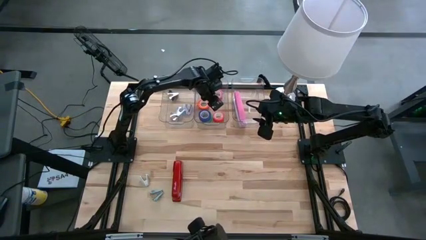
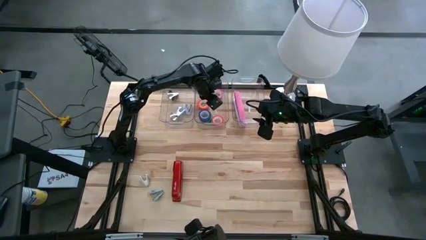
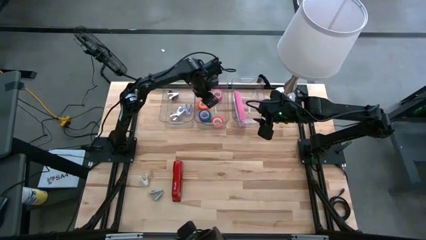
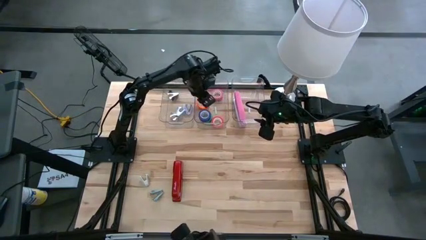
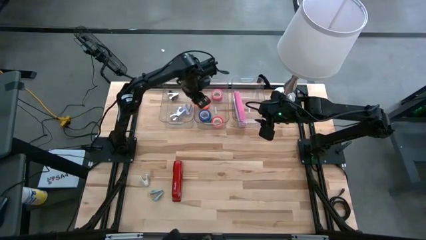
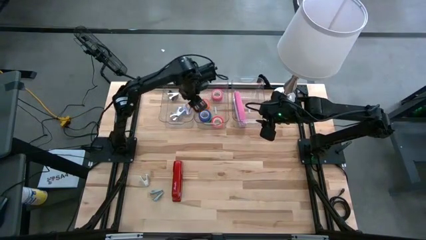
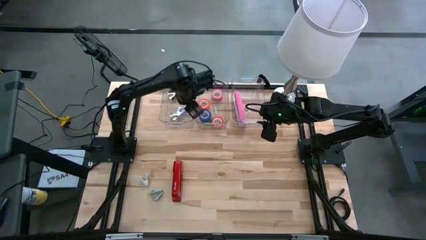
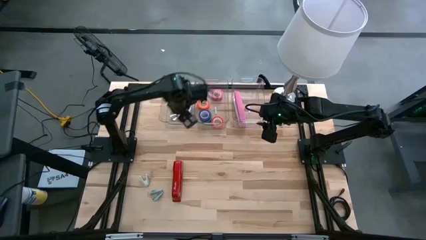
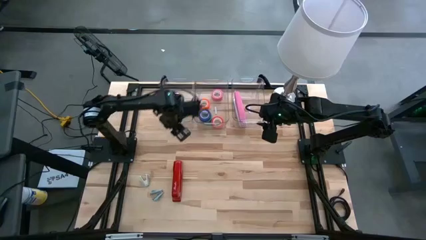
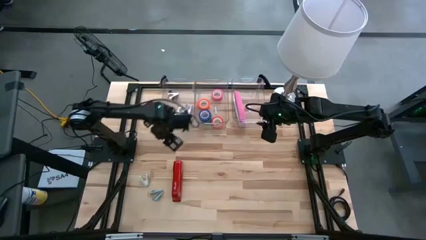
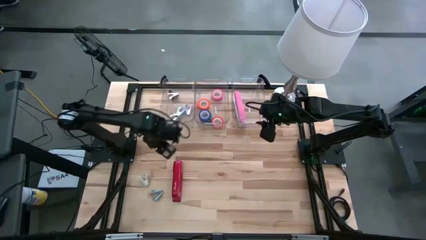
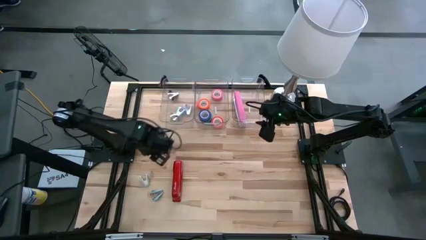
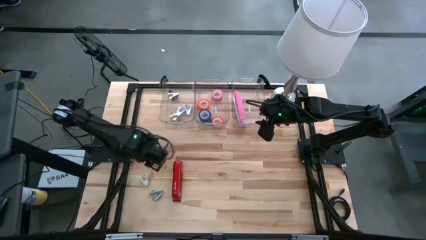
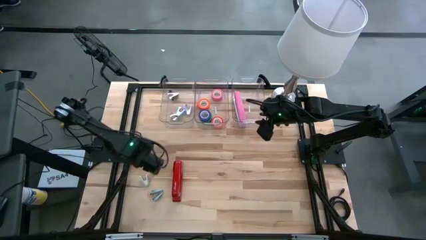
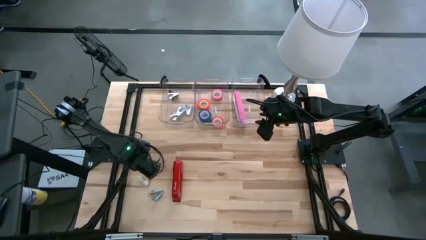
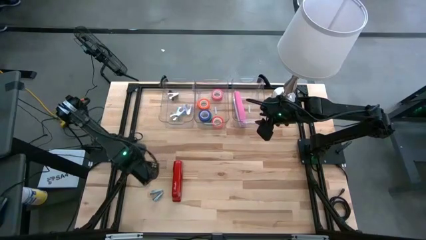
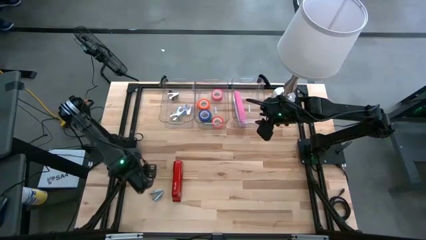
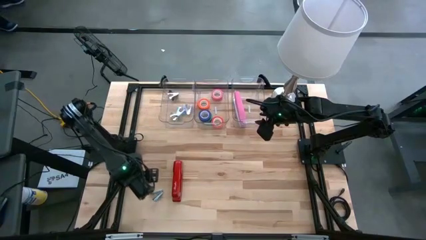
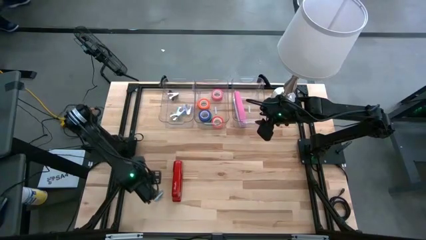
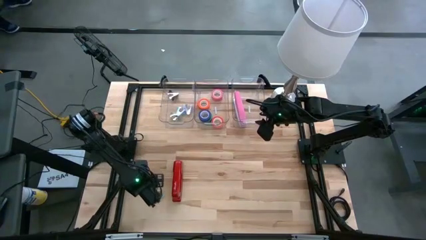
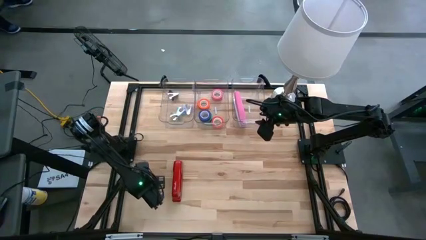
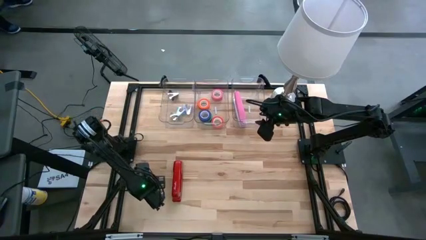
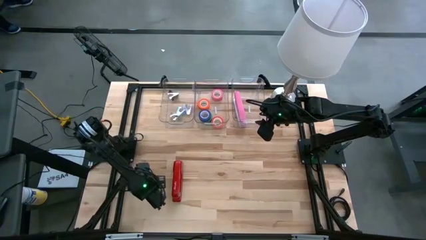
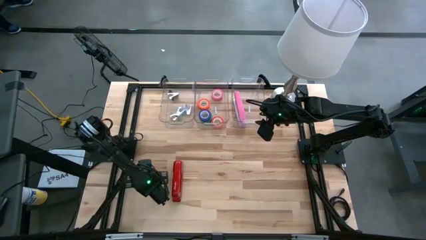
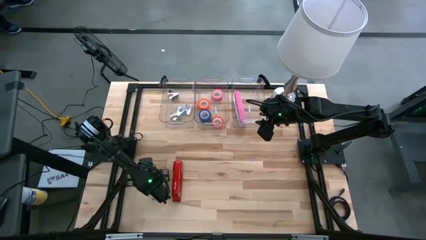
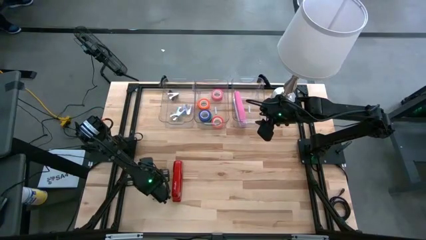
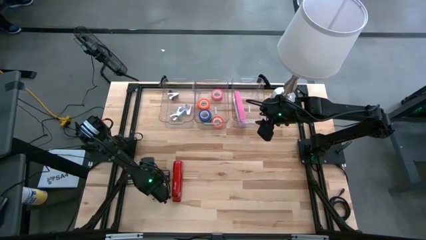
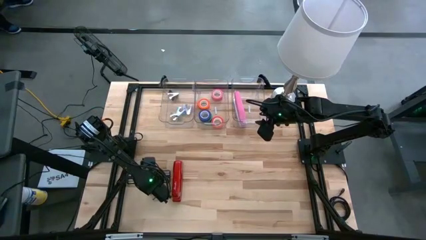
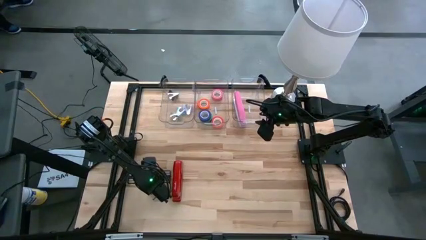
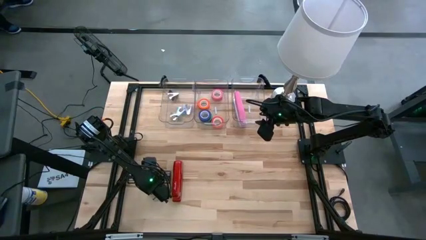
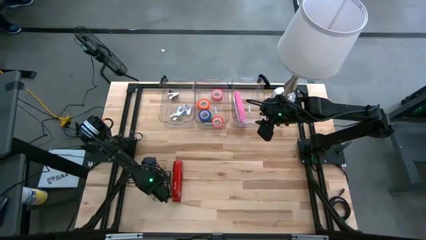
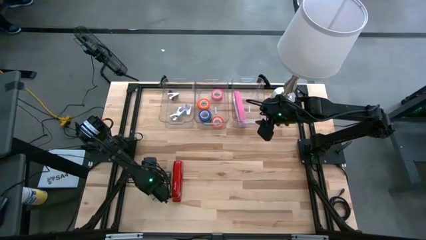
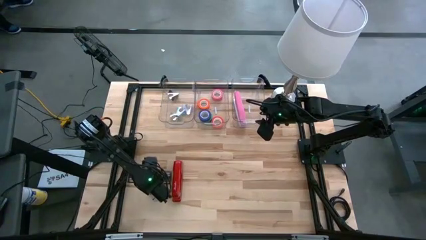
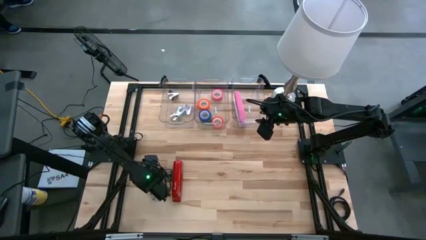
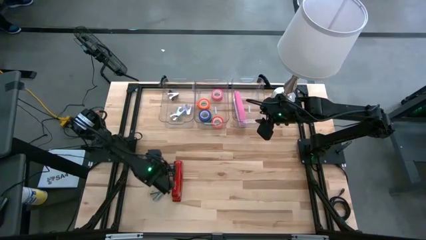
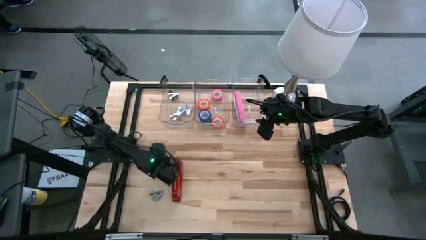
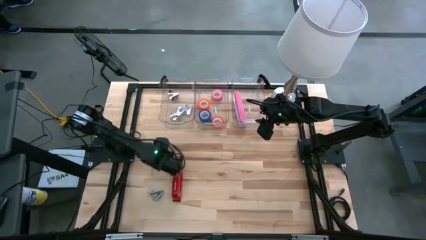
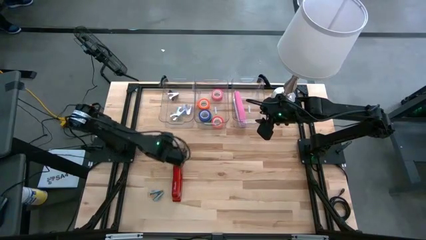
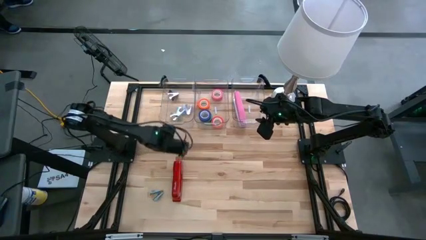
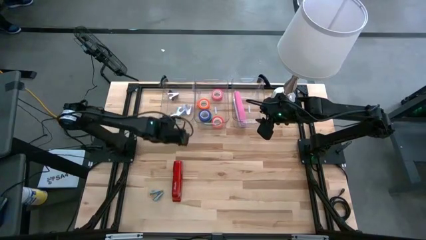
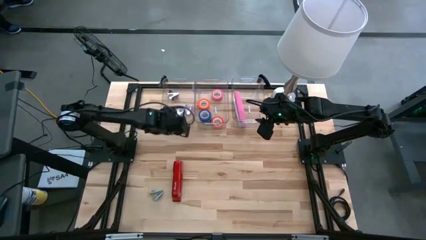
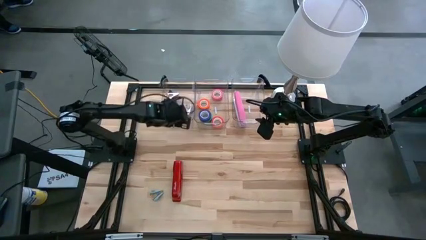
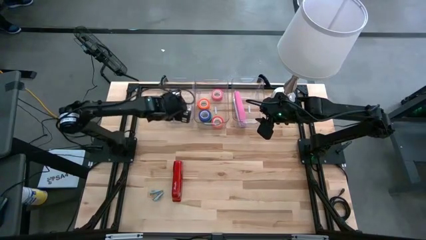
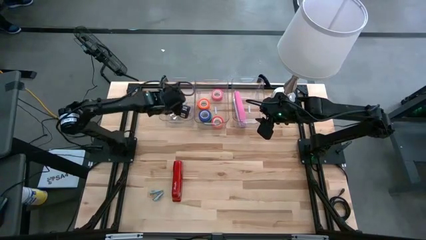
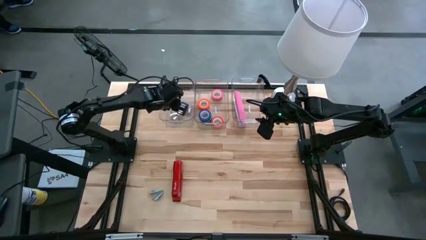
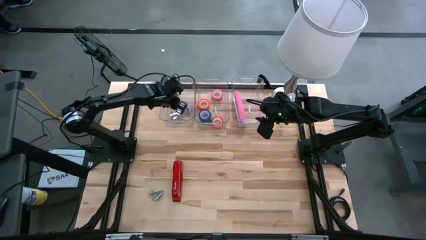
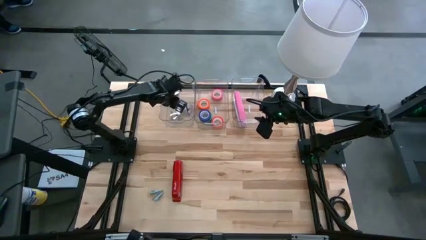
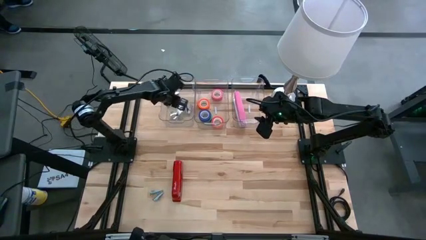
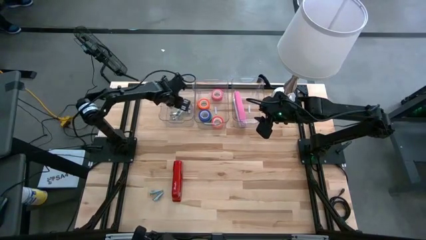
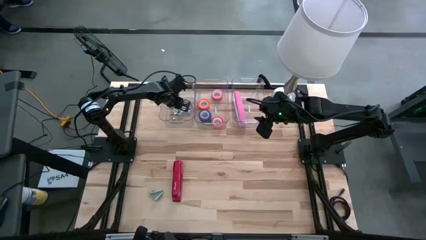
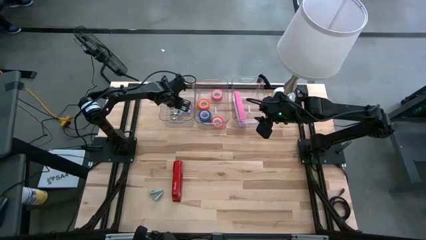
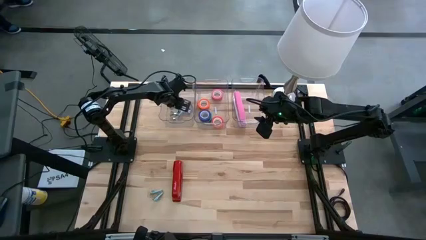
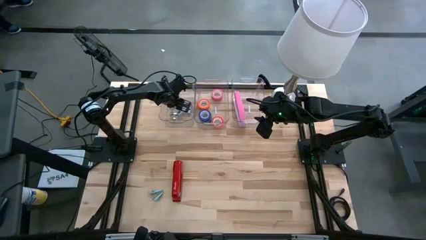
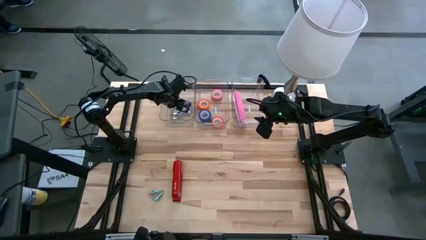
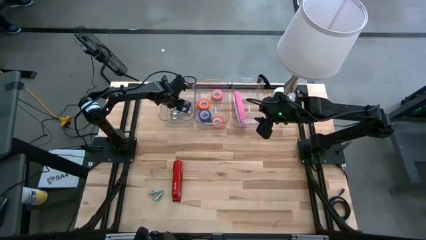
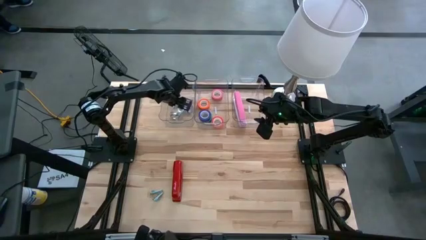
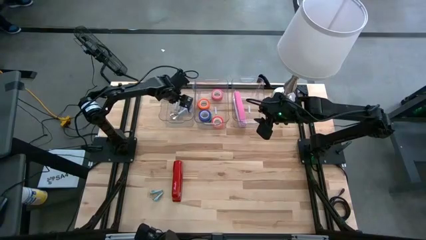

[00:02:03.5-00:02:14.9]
Task: Pick and place Stapler, Stapler remover, tape
Put the gray staple remover into the left transparent bin

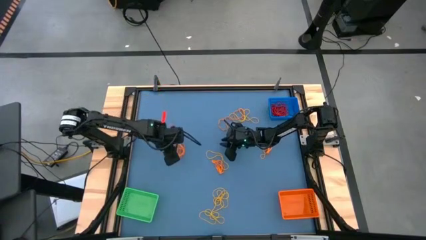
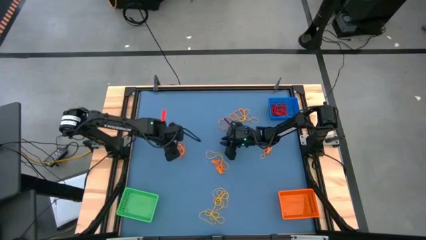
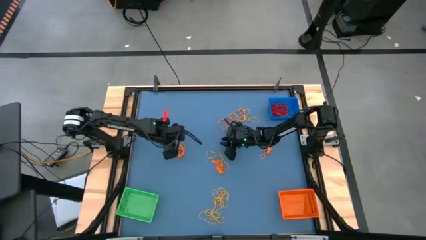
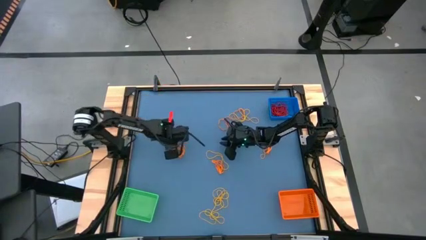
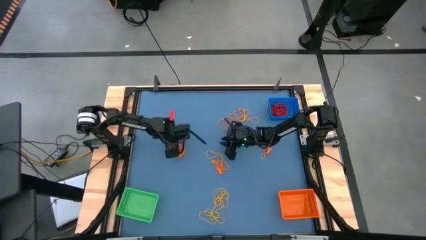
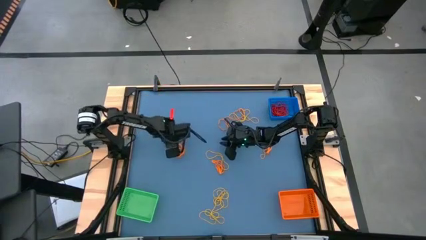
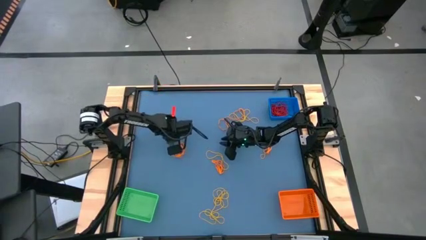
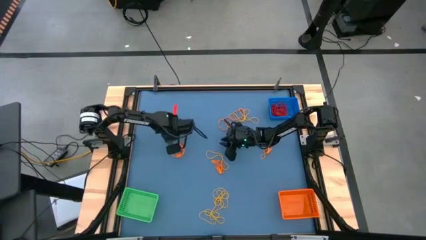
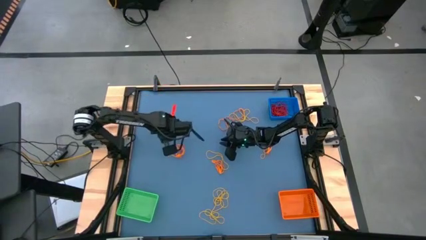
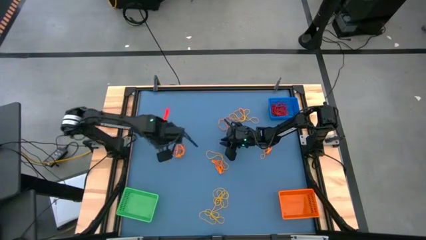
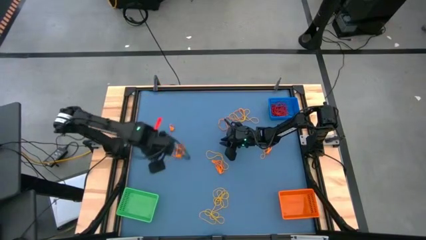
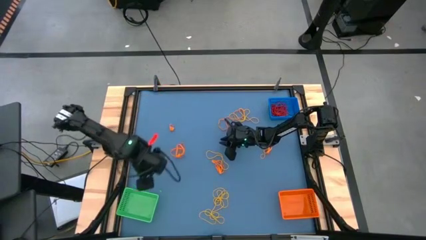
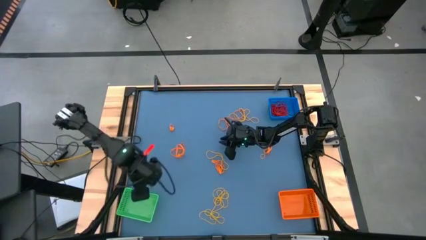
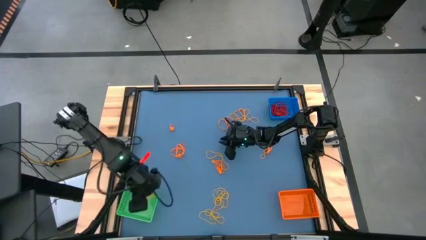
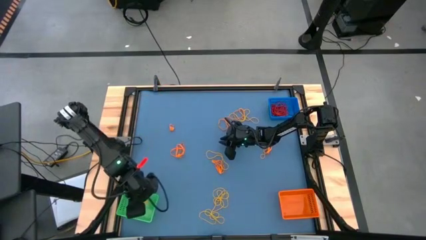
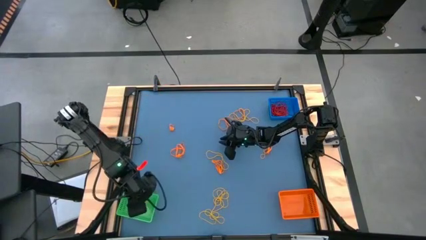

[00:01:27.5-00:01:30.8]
Task: Sort rubber bands into baskets
Put the orange rubber band into the green bin
